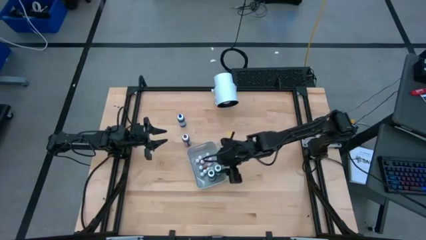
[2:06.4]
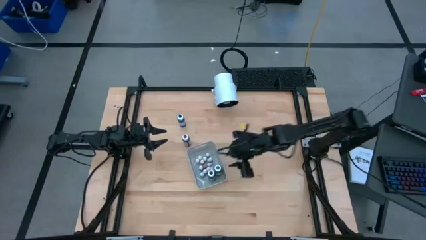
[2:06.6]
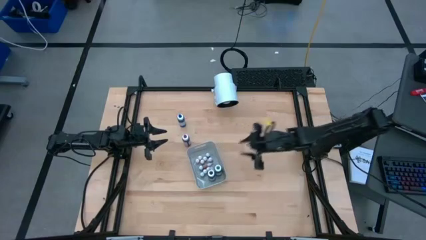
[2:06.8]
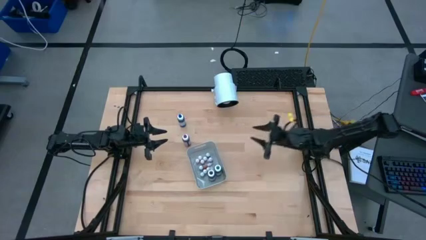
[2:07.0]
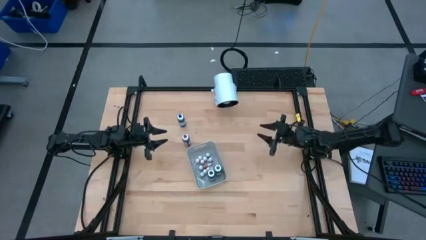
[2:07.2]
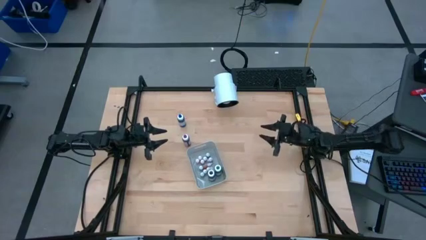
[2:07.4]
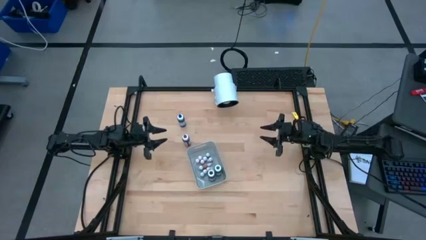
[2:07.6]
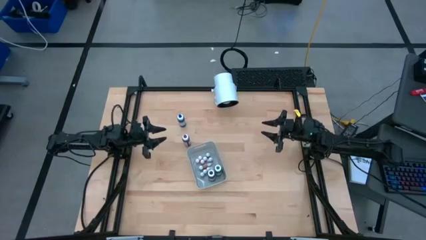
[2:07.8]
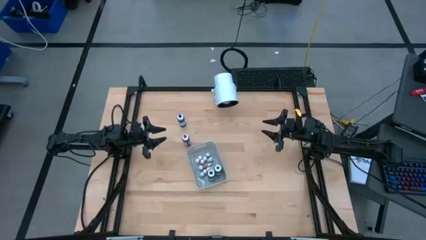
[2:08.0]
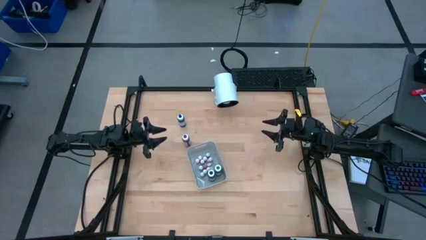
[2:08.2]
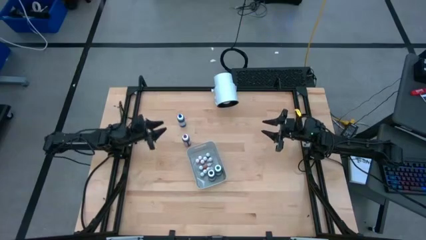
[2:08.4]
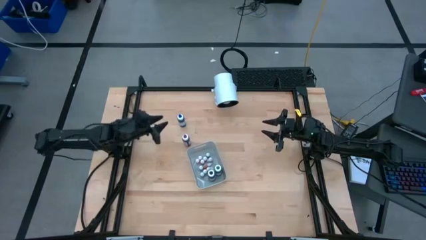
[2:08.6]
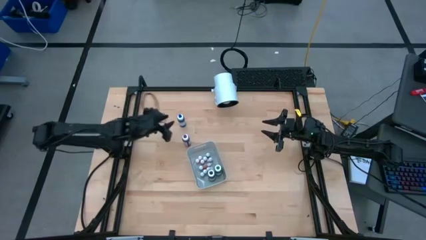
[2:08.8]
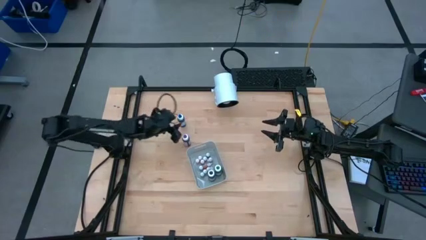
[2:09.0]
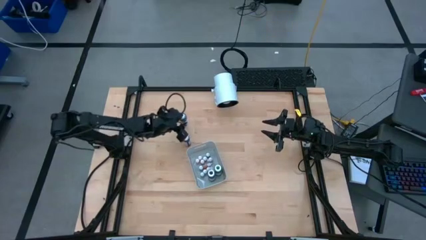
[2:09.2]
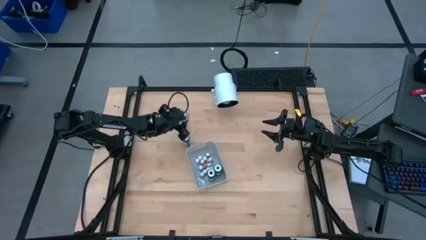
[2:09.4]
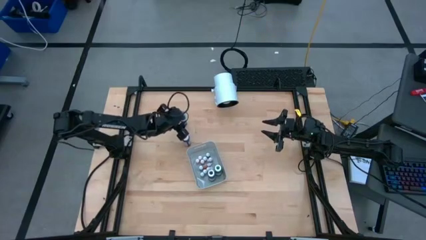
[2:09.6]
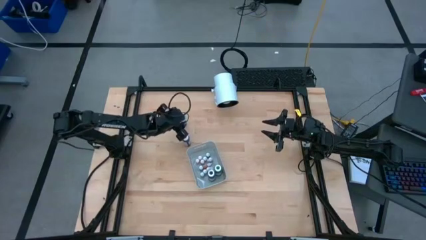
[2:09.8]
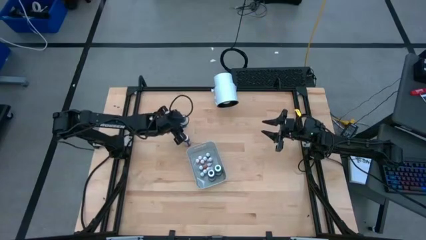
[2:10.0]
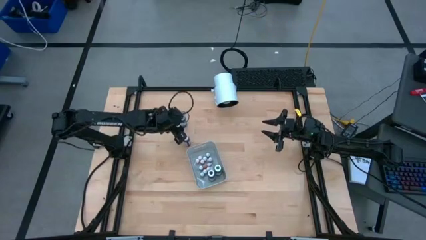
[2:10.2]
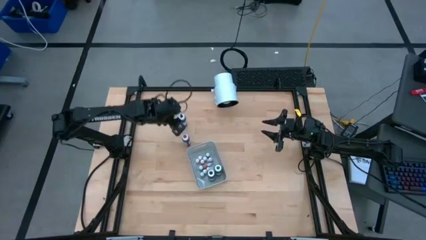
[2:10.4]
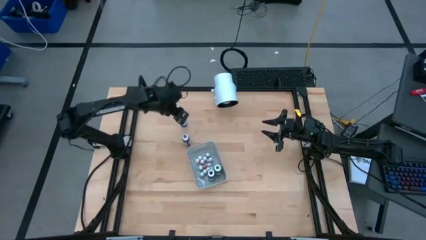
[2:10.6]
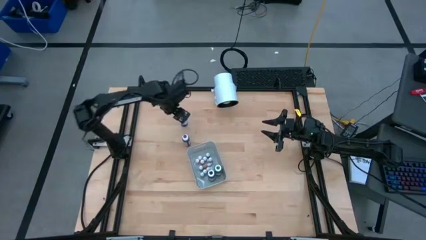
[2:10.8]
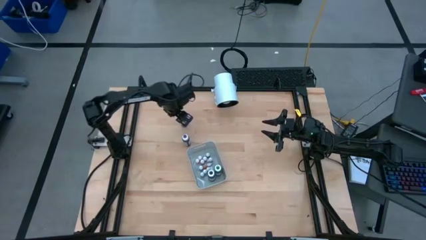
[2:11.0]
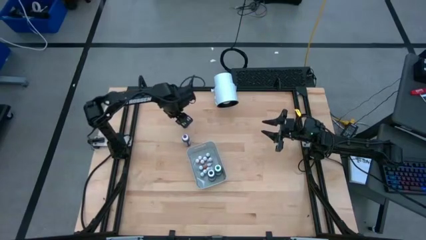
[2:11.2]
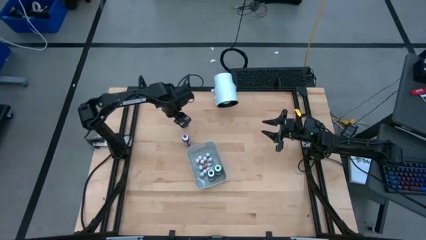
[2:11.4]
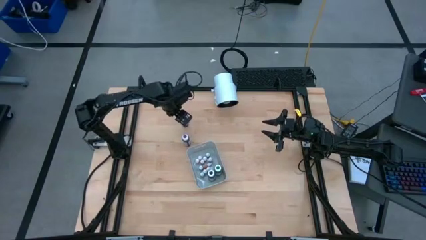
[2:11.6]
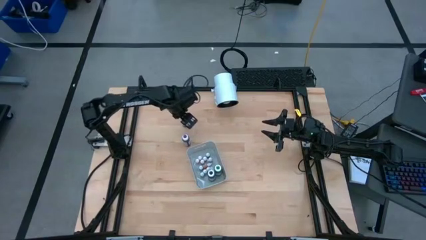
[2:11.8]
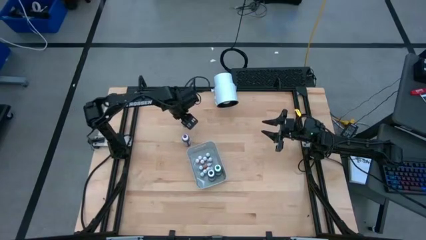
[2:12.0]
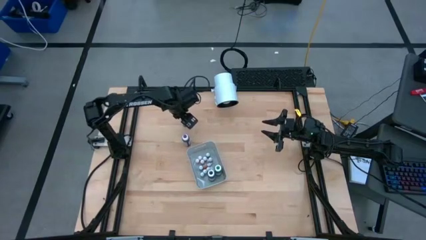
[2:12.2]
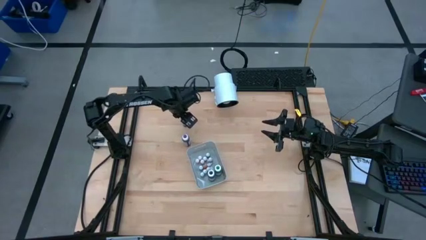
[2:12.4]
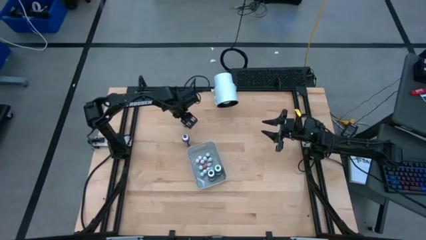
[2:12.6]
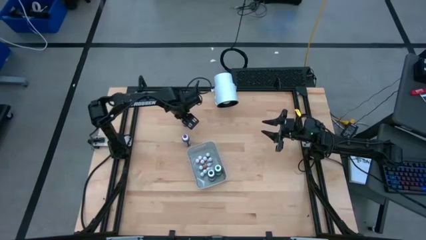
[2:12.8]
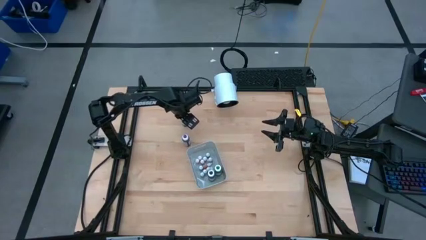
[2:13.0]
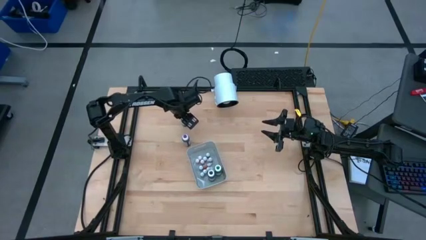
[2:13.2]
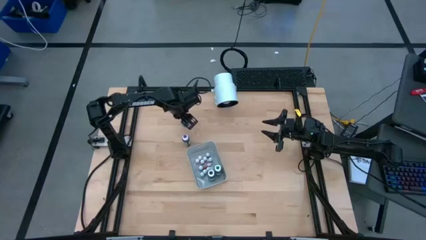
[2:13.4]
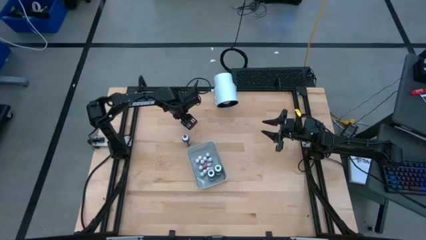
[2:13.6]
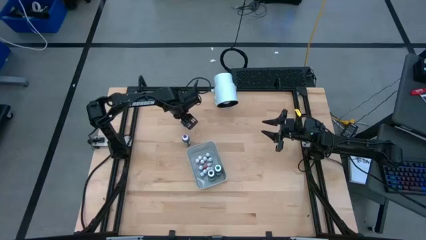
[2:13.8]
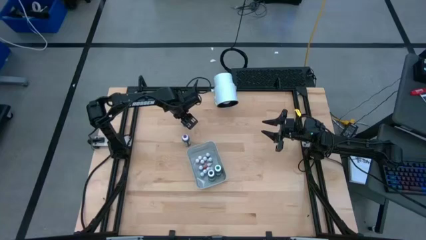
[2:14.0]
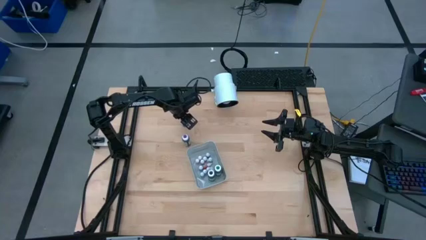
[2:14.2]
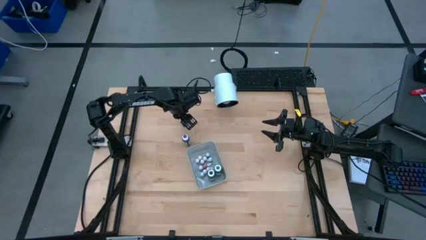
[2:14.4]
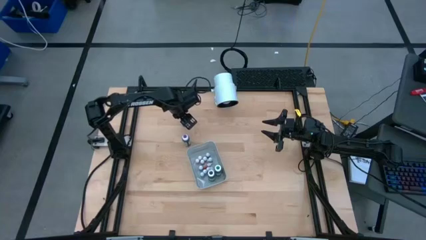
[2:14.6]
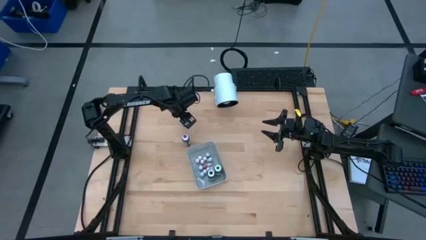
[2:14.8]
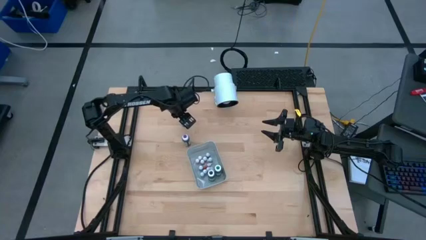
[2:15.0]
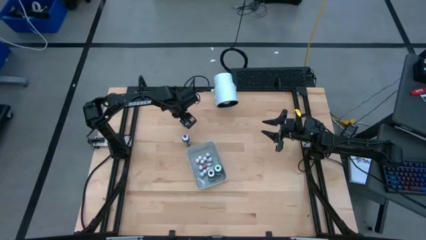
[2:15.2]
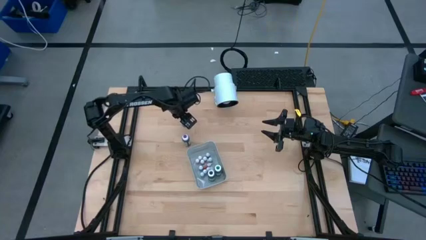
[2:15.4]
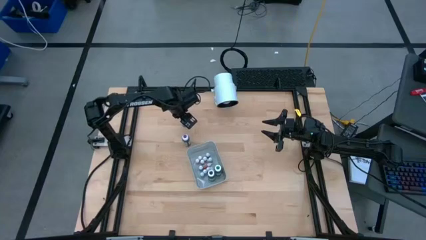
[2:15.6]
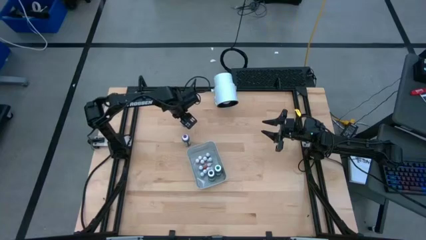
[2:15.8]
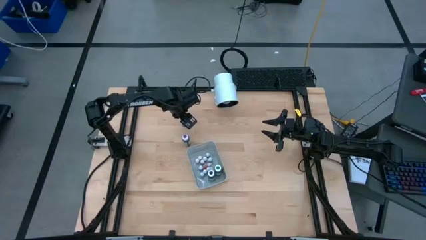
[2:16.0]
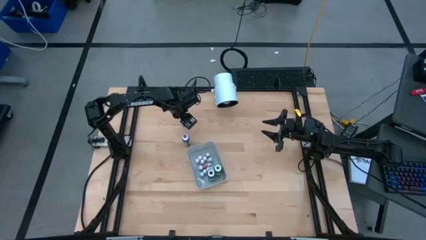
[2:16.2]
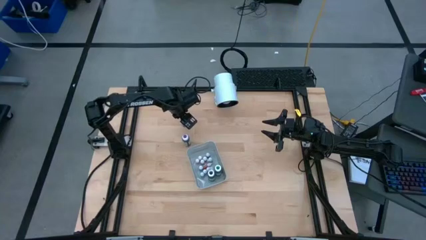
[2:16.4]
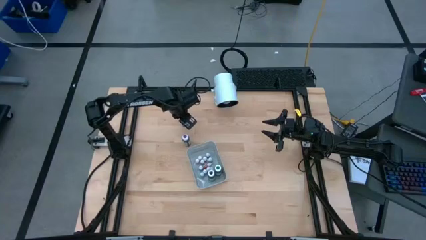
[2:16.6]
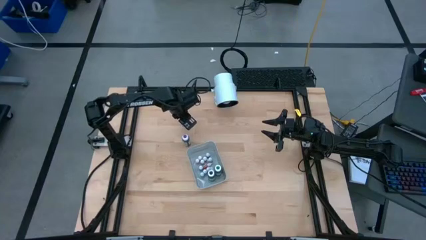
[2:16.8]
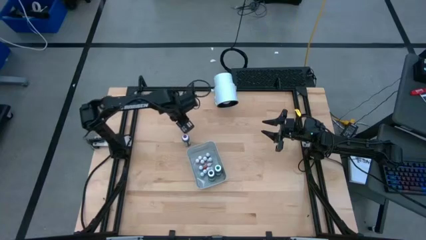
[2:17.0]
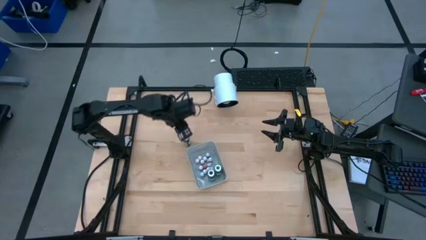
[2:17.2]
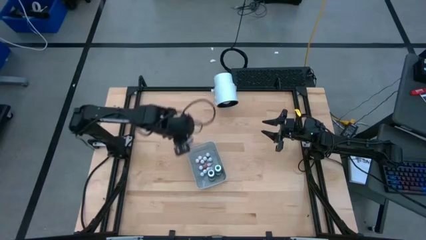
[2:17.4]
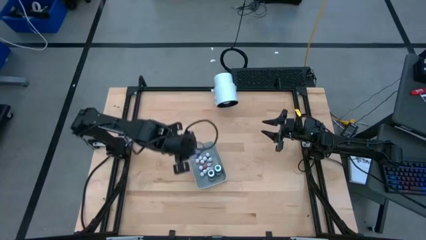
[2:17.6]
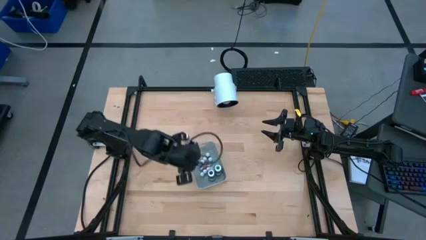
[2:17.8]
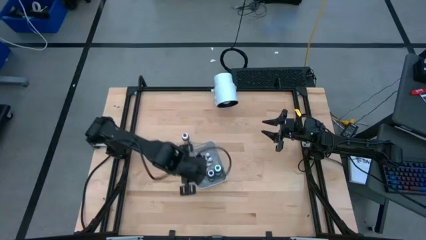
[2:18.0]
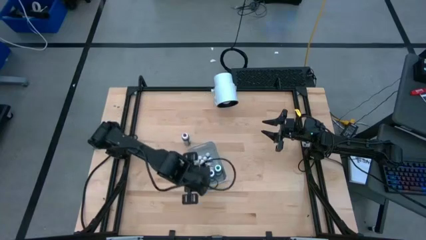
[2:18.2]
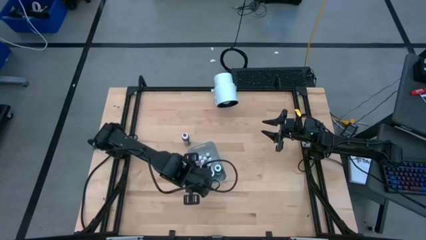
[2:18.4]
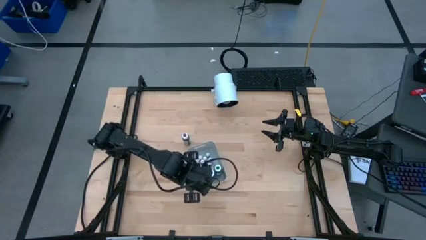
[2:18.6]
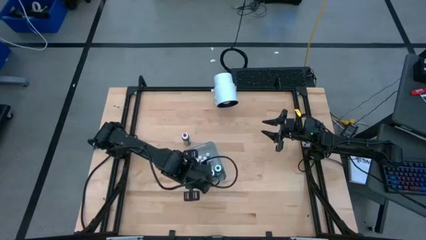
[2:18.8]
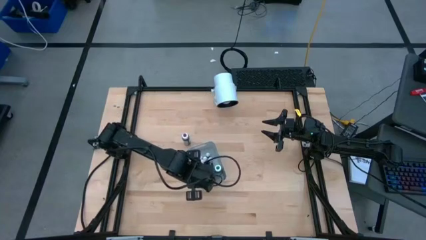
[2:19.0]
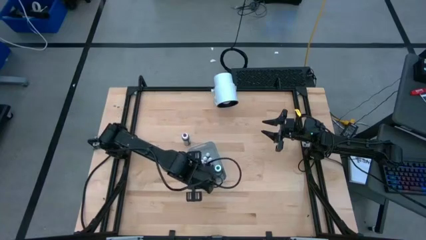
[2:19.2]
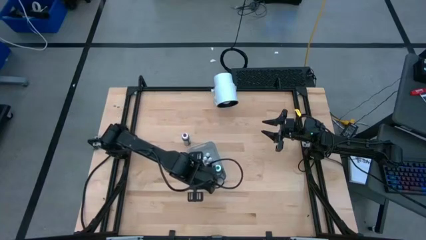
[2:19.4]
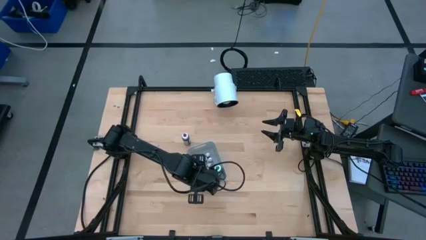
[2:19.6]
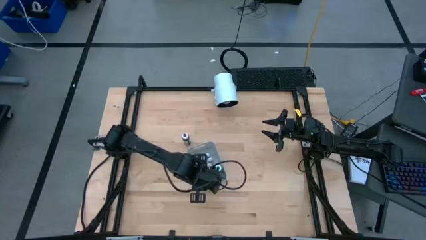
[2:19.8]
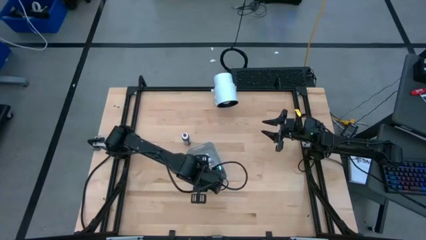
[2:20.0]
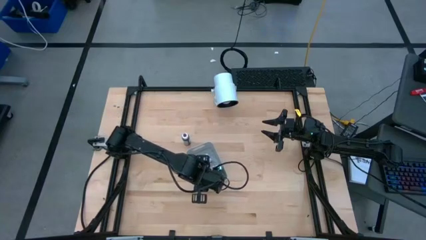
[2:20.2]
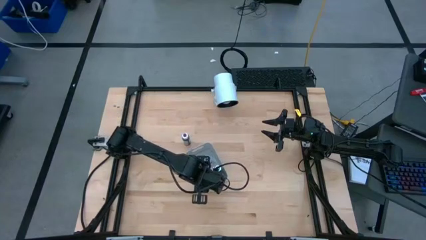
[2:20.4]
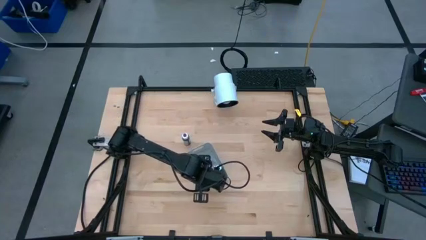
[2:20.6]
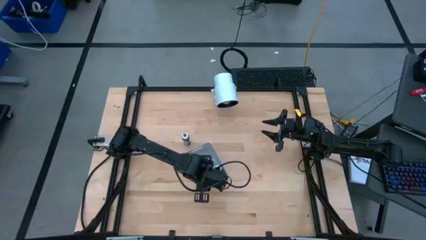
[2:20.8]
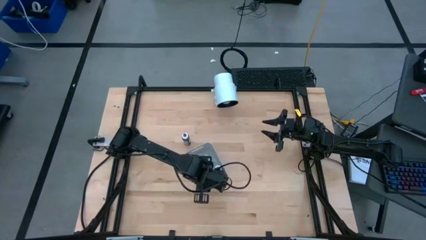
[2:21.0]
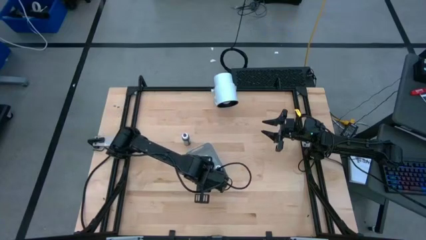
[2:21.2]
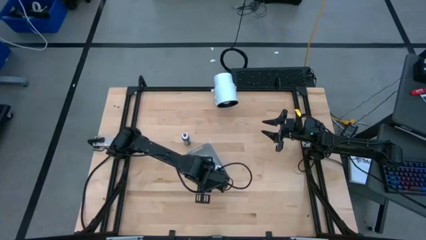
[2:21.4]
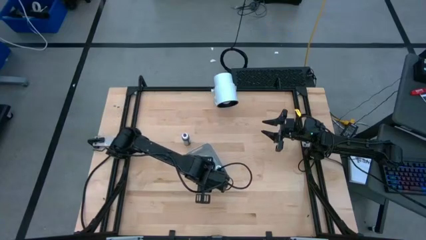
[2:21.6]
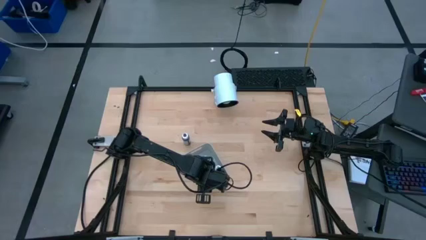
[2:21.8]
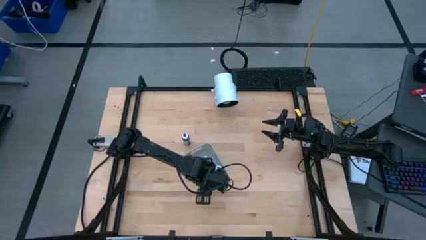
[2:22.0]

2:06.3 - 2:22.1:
Task: Pick & Place food coloring
Put the large blue food coloring bottle into the gray bin

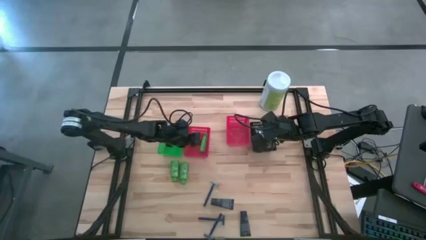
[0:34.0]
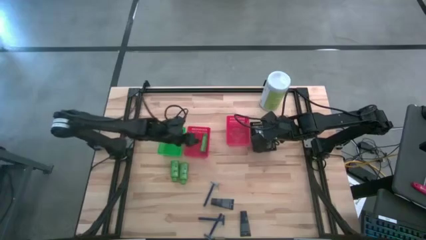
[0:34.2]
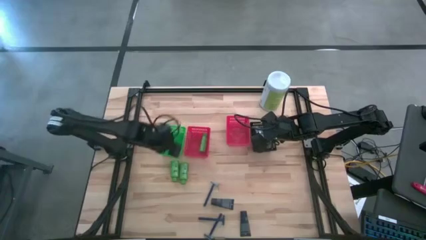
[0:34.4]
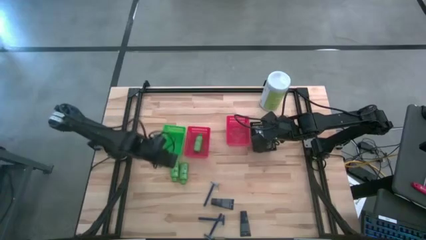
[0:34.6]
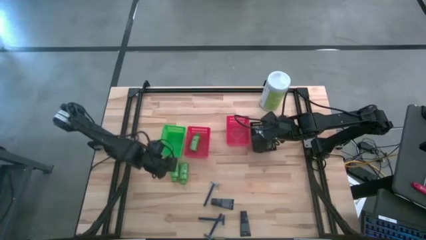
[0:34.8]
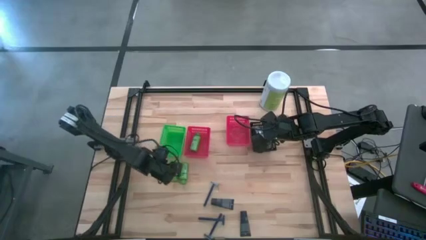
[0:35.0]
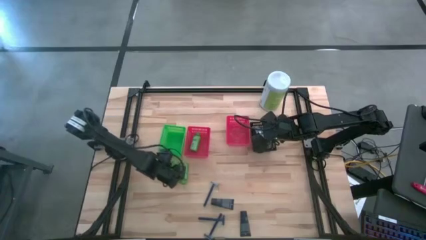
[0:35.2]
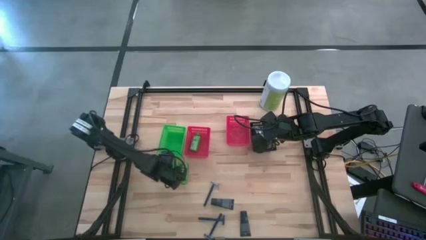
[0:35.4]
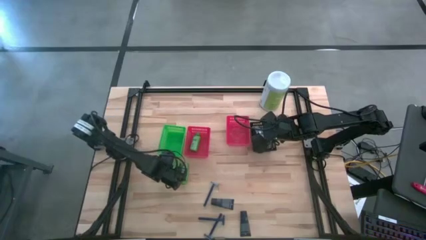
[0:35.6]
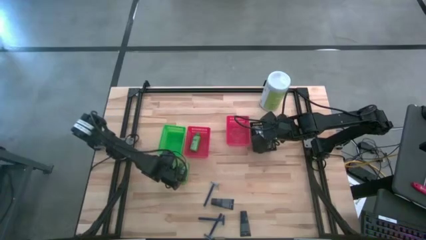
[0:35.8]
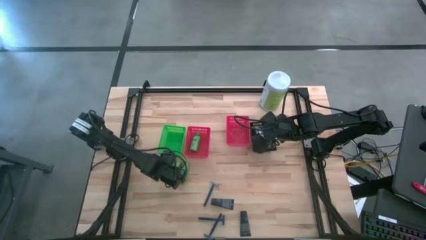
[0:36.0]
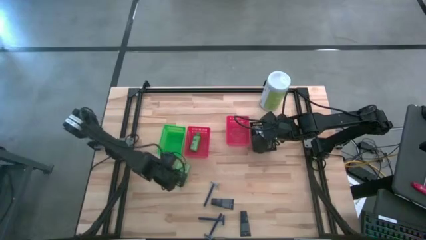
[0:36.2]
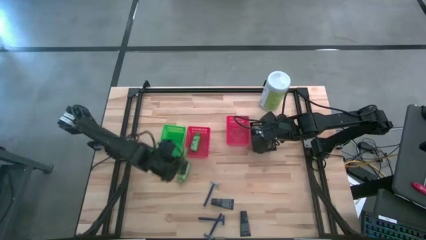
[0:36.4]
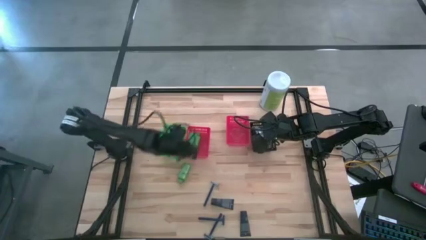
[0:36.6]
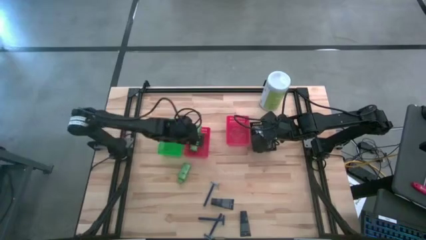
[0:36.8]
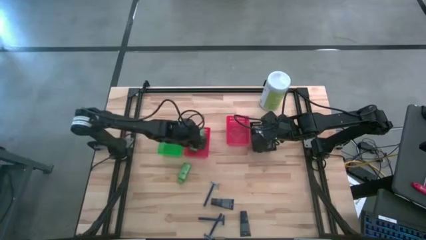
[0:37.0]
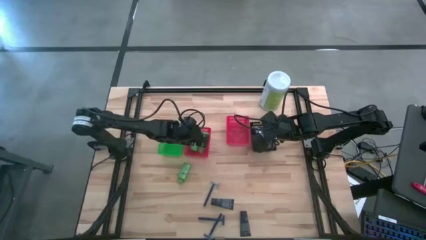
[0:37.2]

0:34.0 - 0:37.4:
Task: Pick & Place Travel size toiletries
Put the green shampoo into the left red basket
